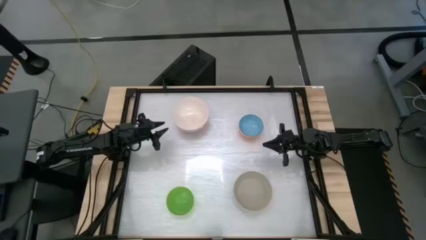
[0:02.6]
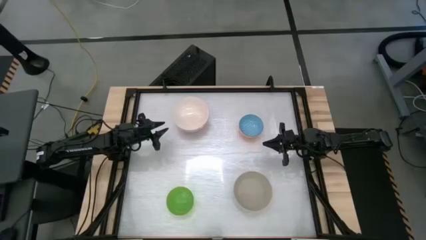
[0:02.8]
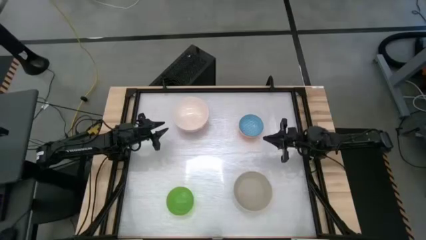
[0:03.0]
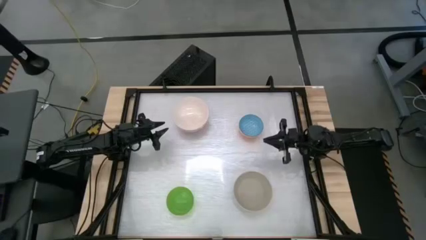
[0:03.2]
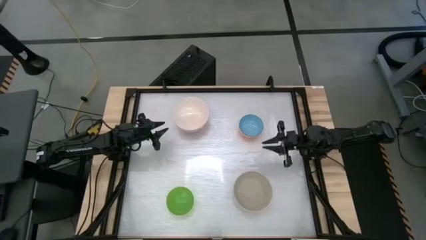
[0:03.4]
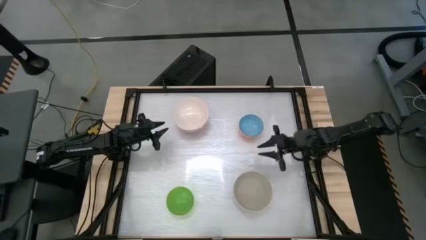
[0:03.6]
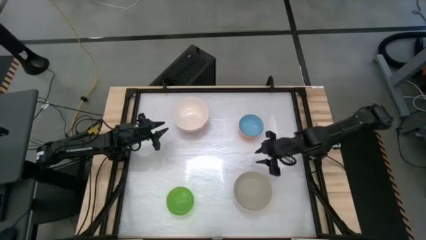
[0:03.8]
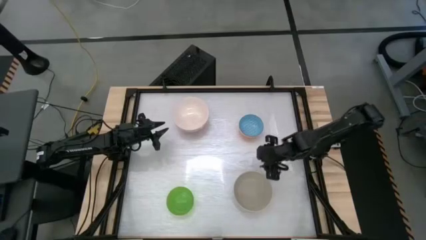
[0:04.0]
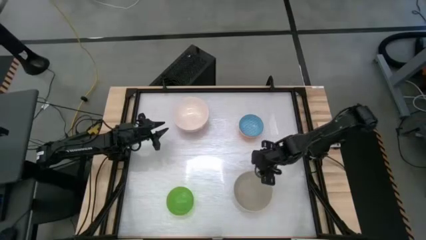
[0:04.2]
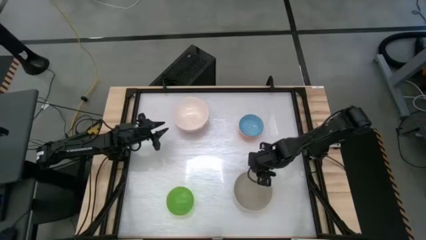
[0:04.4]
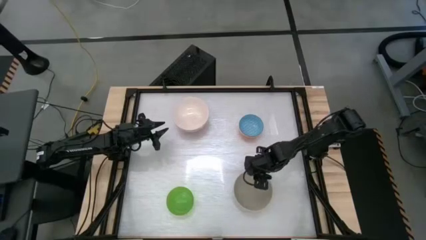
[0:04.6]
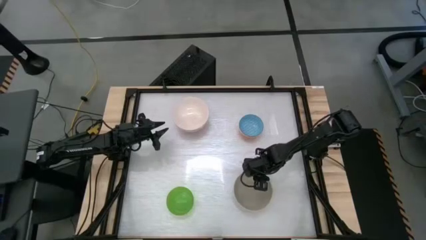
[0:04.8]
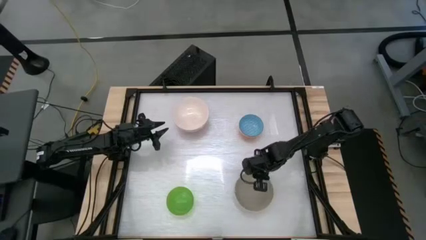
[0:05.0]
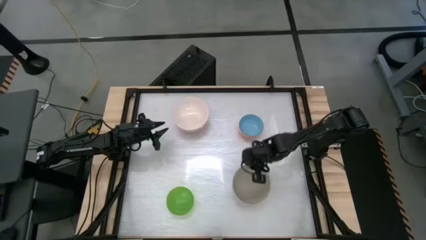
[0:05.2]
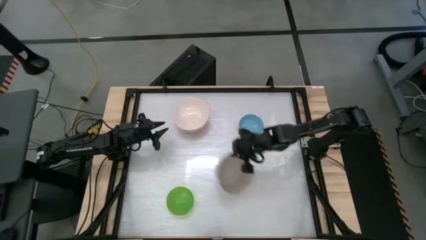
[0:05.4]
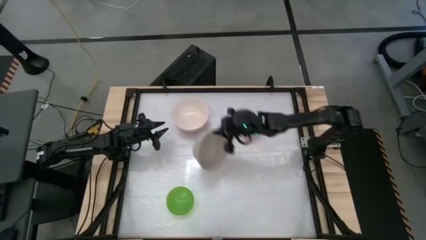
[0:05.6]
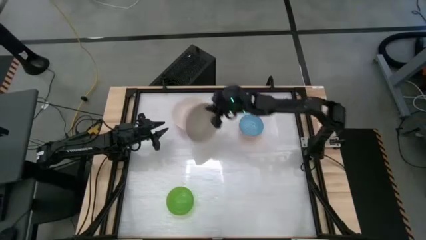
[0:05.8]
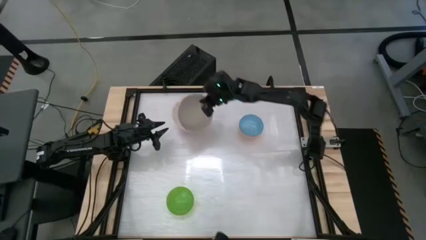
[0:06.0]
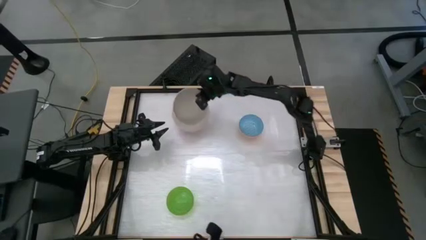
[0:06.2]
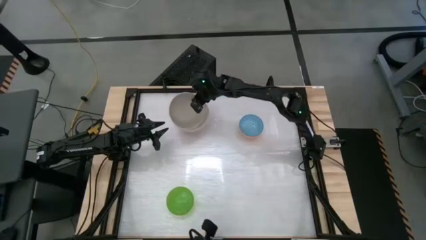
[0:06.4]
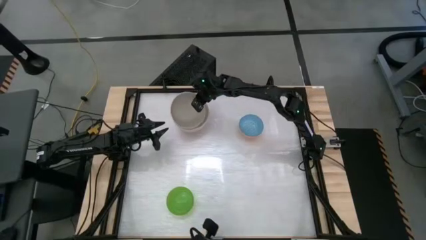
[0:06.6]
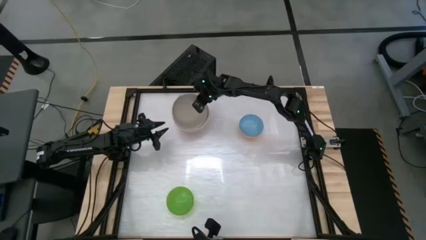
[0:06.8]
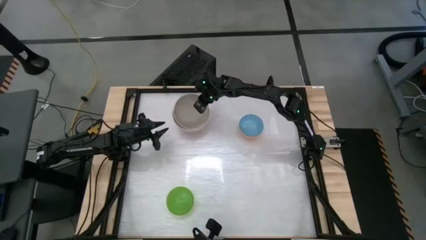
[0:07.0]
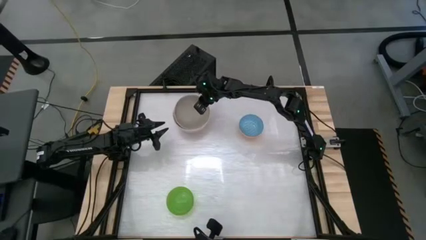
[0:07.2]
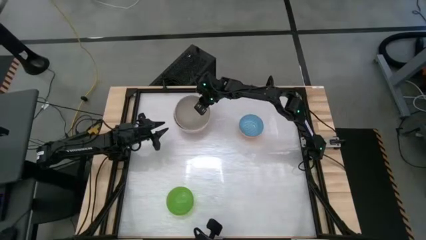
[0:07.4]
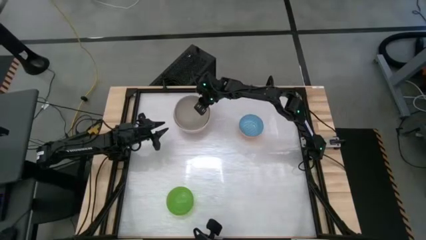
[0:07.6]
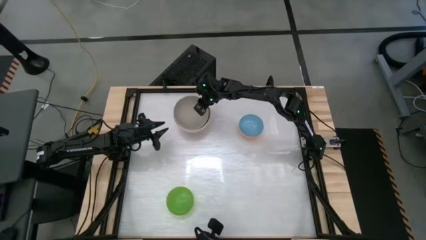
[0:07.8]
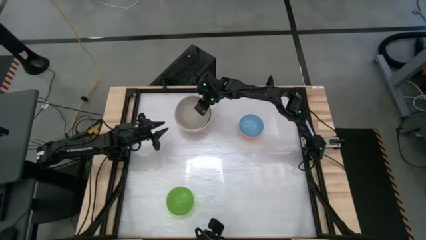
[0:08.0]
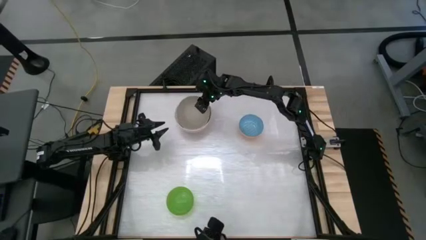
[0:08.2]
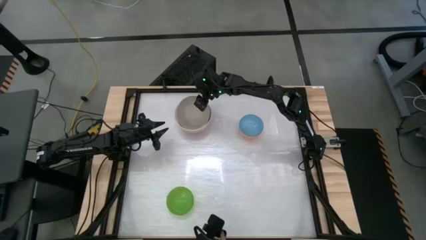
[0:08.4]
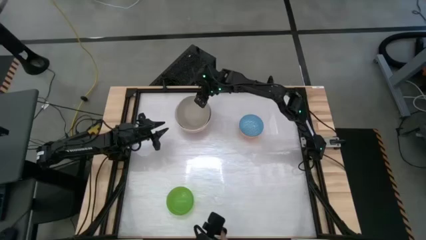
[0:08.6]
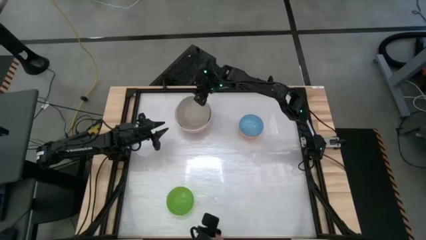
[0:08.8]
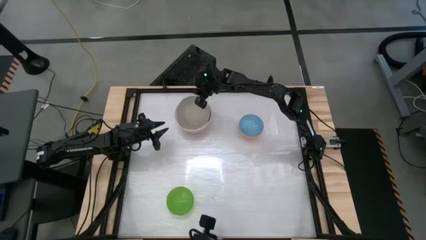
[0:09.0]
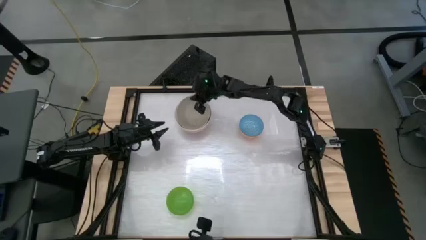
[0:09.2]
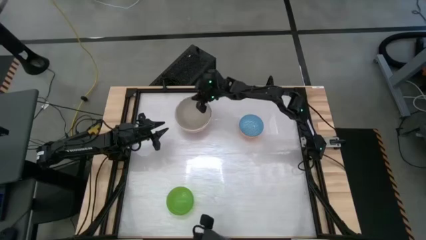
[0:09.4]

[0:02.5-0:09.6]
Stack the gray bowl on top of the light pink bowl

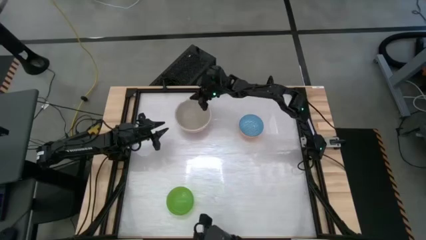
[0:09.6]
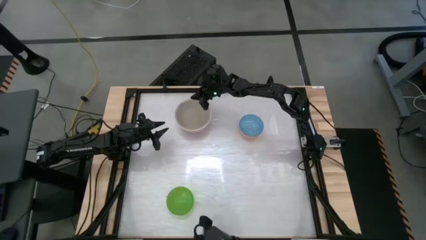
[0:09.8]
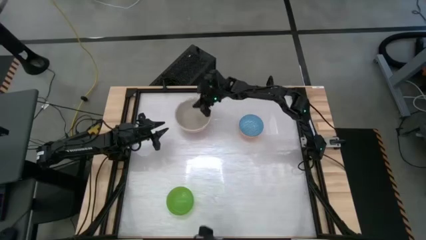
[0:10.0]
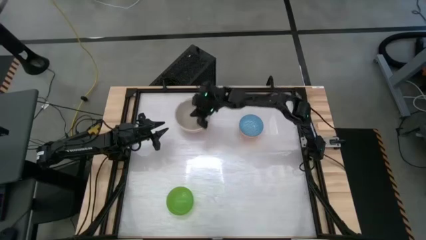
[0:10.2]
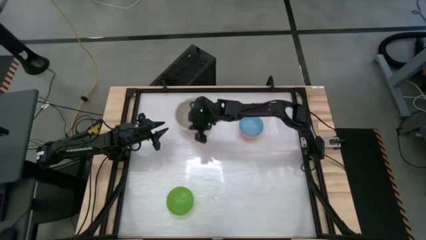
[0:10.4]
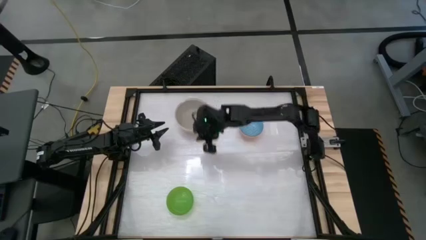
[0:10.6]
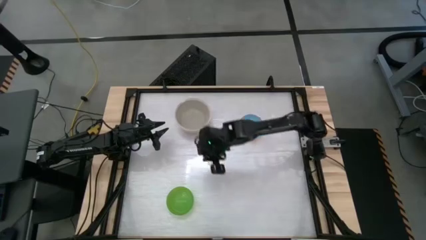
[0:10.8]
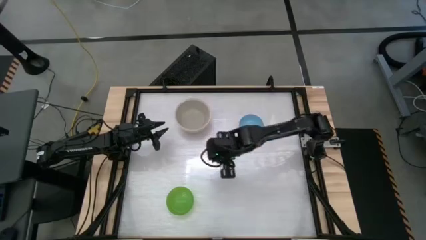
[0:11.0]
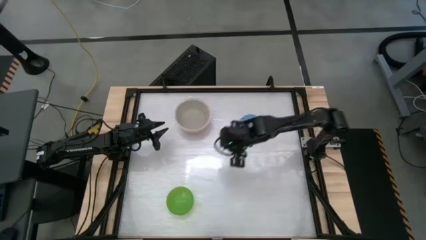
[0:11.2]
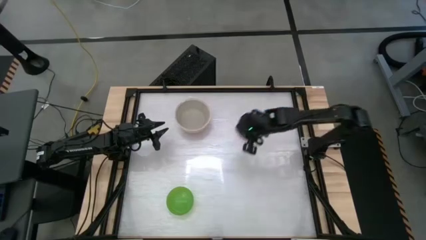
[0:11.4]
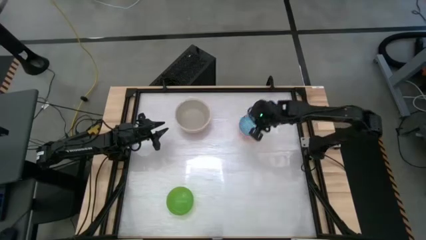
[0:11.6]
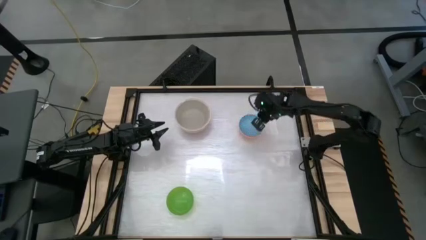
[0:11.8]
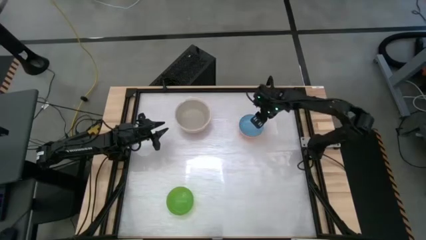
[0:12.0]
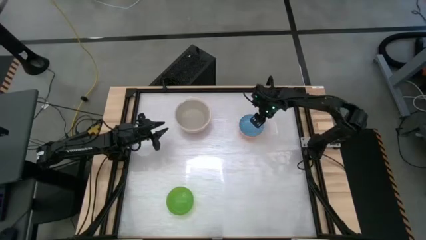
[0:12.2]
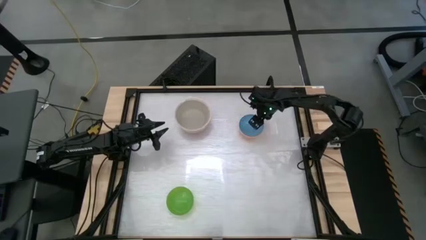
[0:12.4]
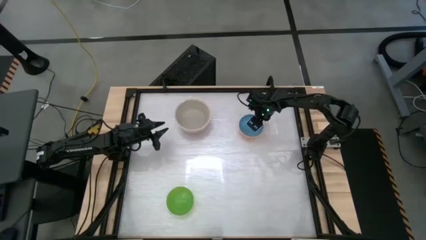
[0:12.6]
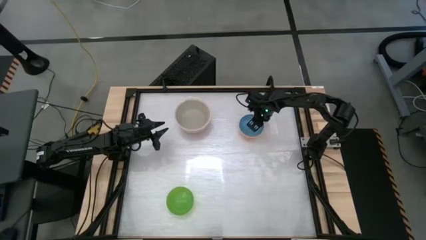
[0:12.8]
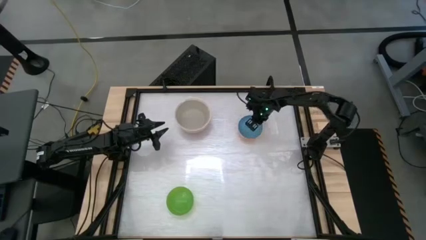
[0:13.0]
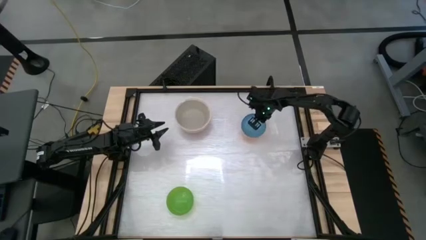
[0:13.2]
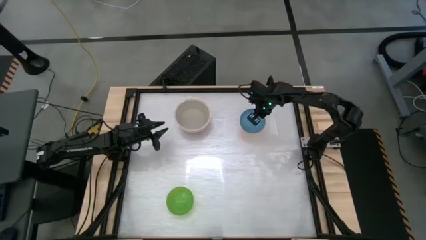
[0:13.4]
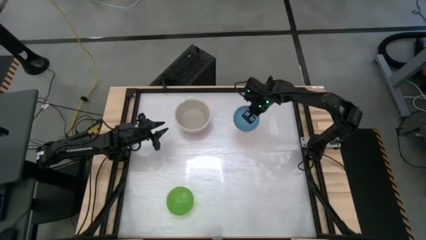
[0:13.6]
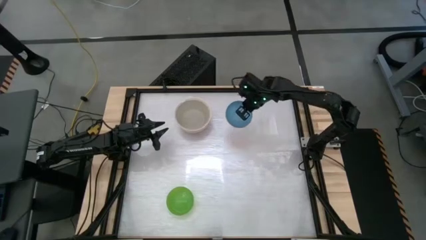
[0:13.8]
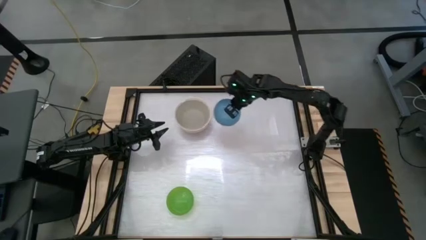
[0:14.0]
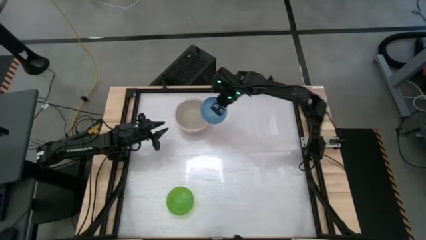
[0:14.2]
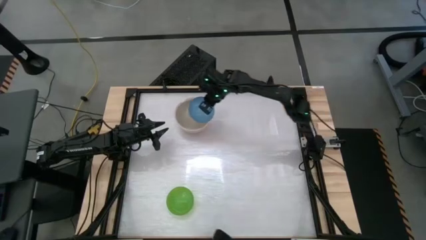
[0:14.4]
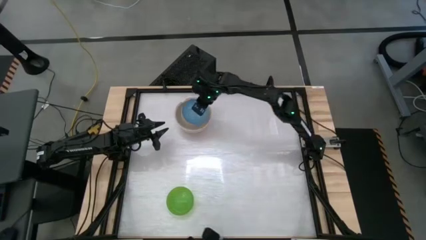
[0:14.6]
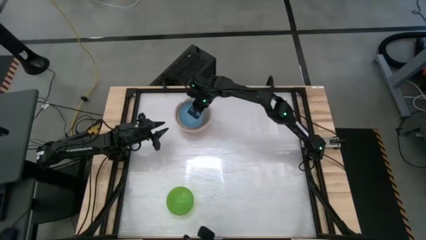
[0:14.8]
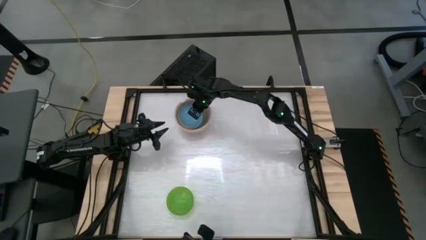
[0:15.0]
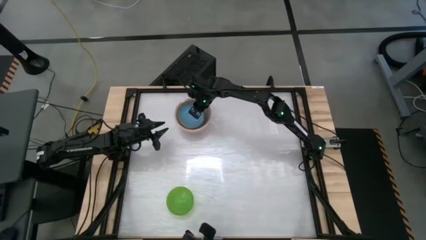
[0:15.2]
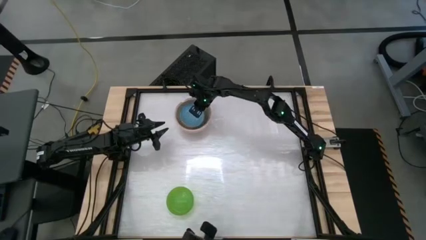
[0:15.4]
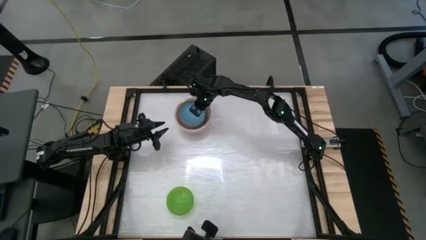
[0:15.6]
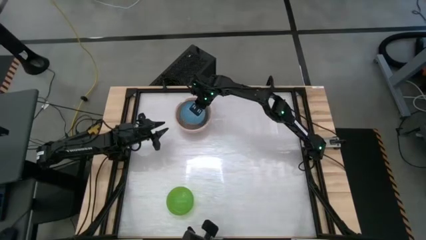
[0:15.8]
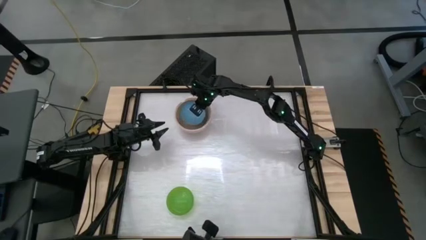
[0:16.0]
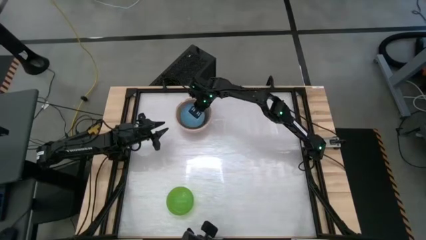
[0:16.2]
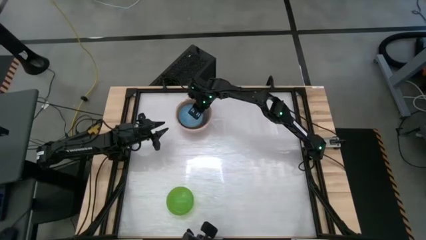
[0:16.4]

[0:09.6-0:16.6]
Stack the orange patterned bowl on top of the gray bowl
